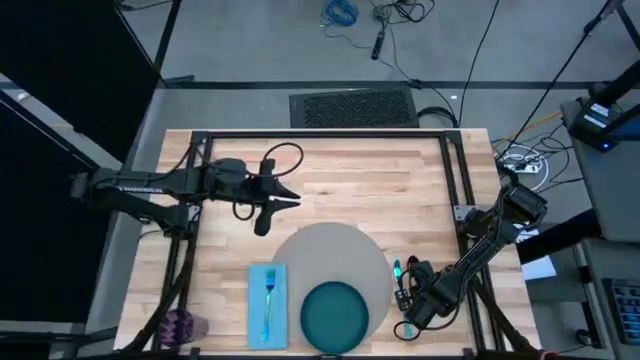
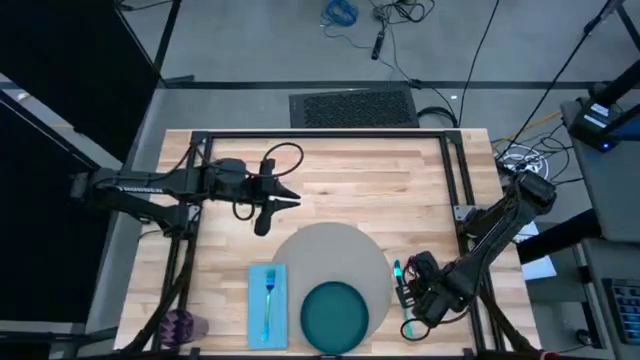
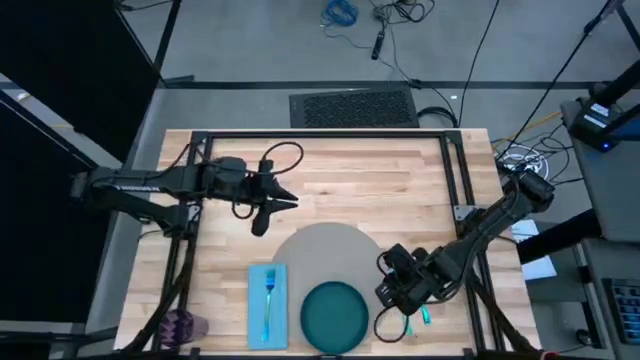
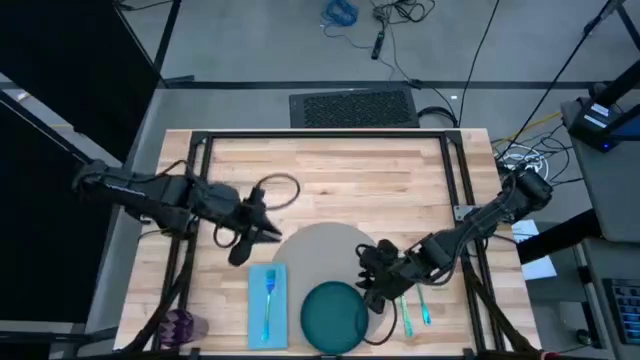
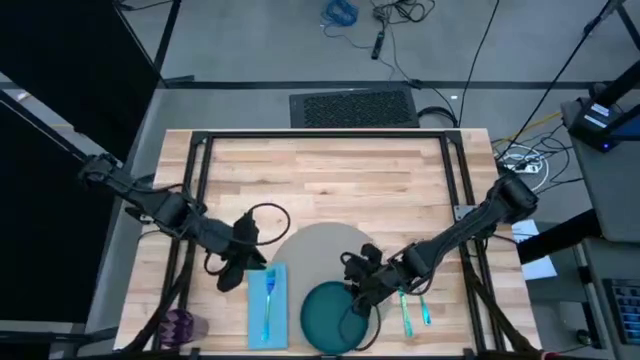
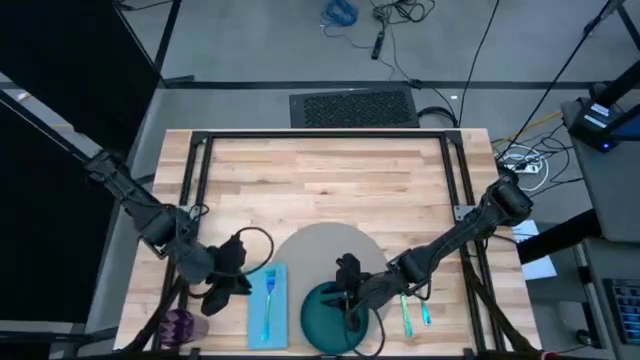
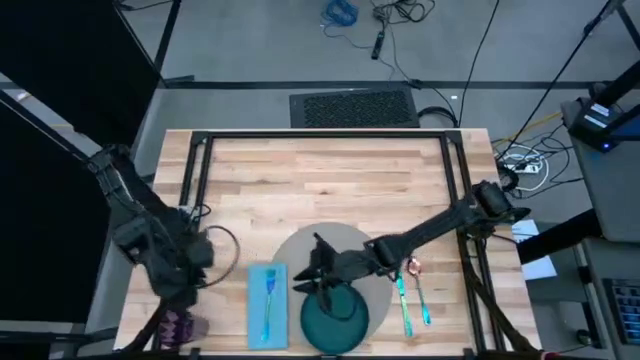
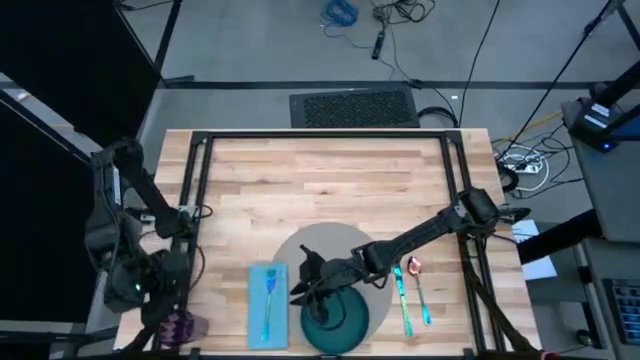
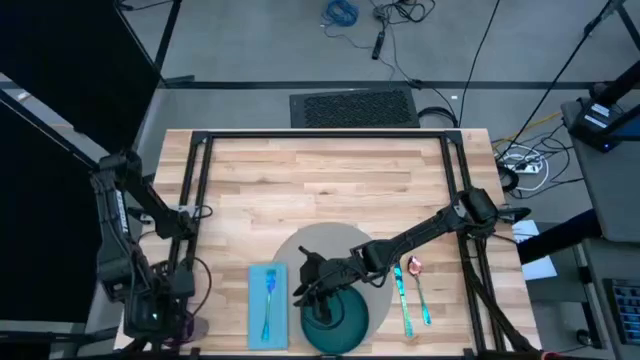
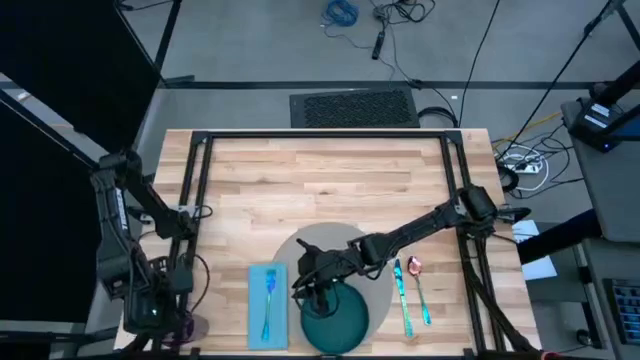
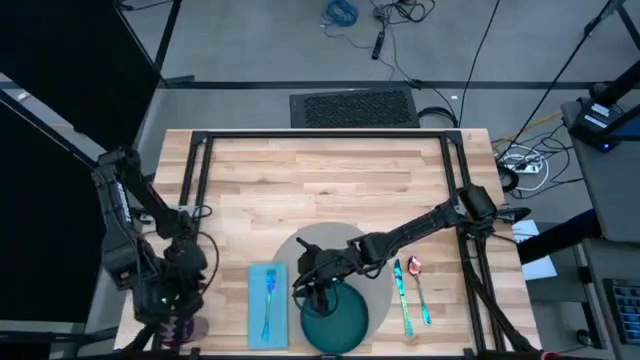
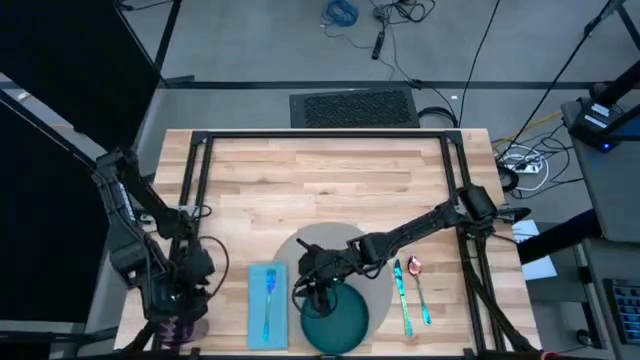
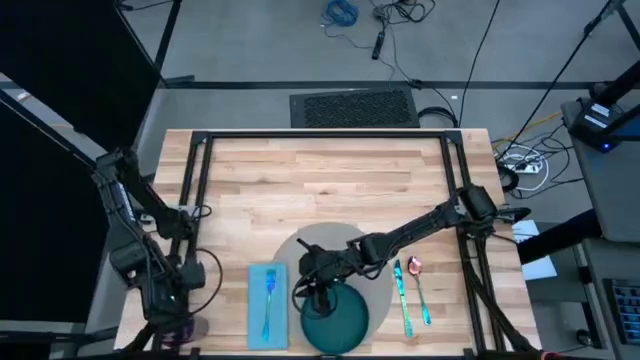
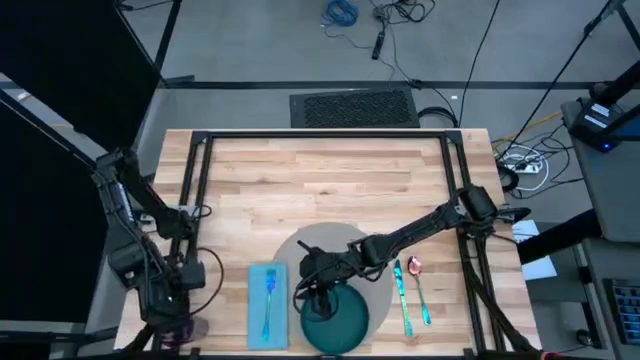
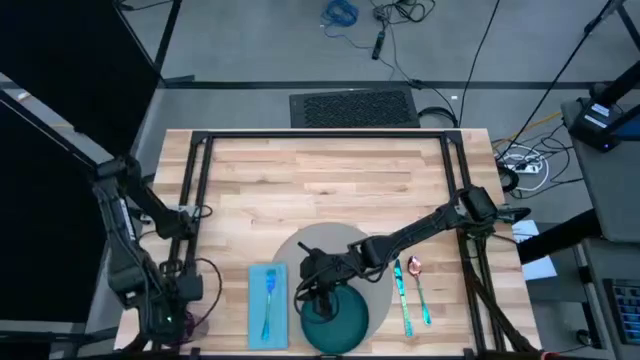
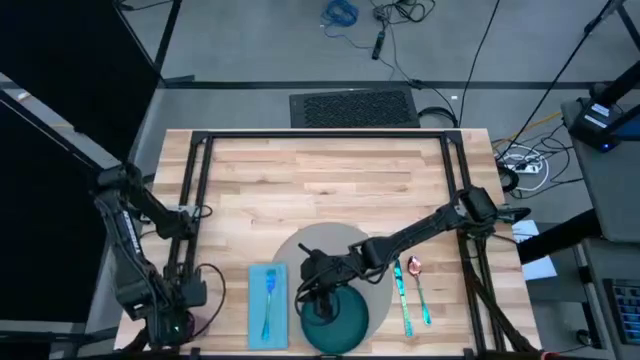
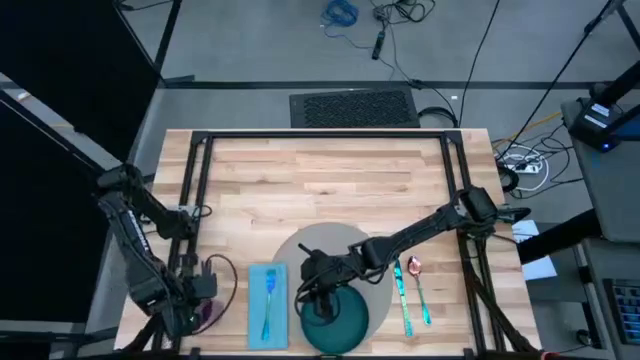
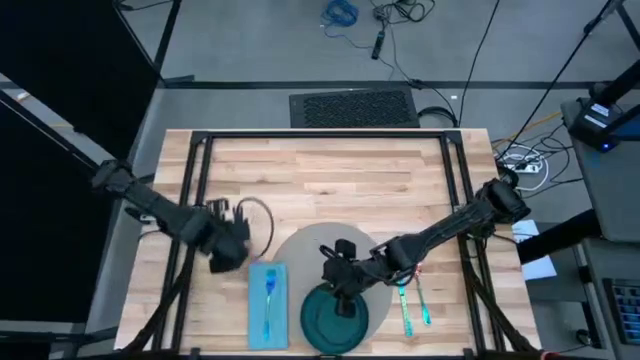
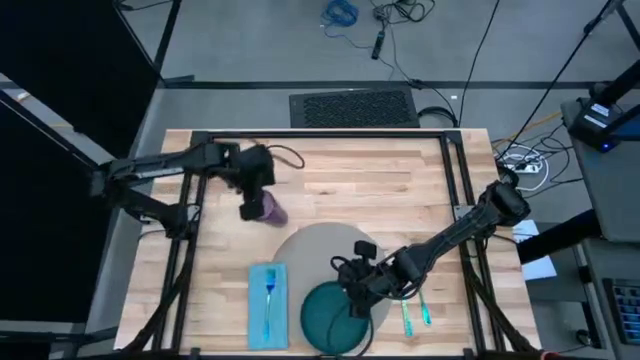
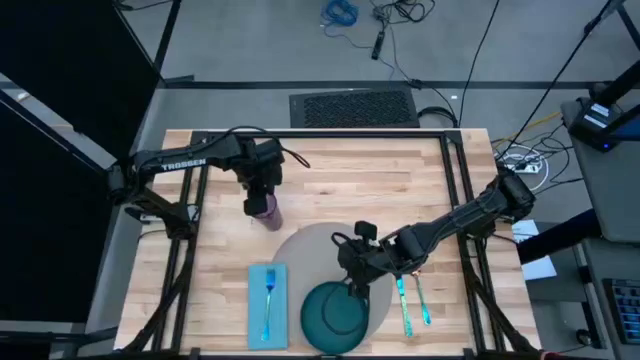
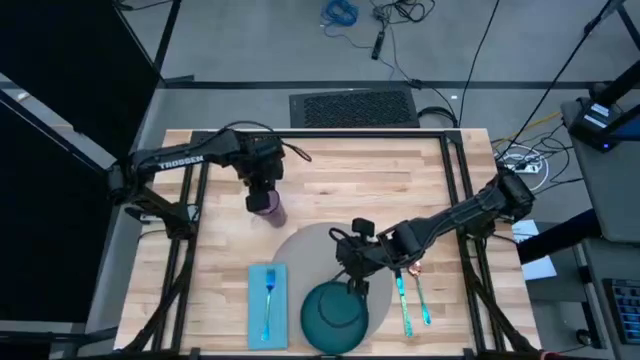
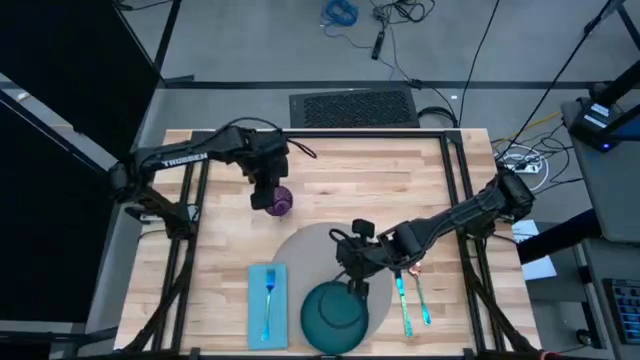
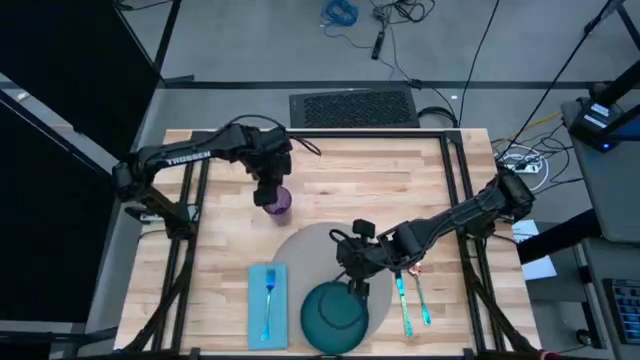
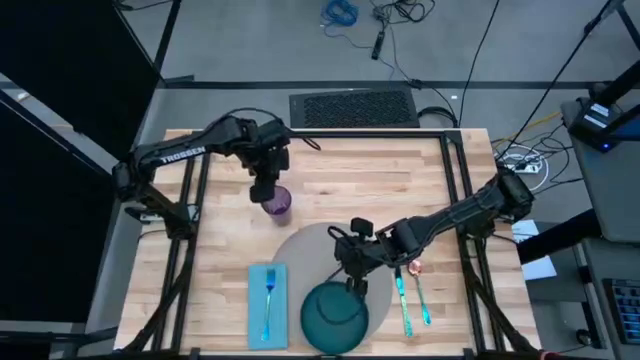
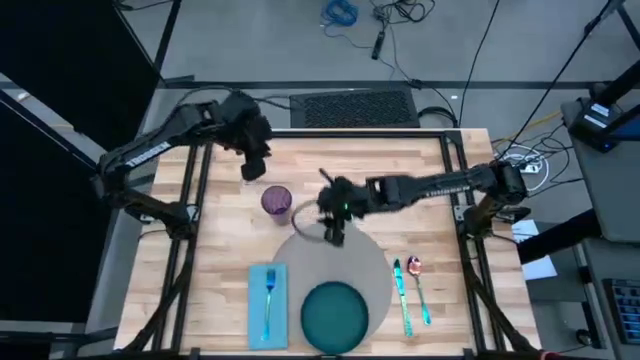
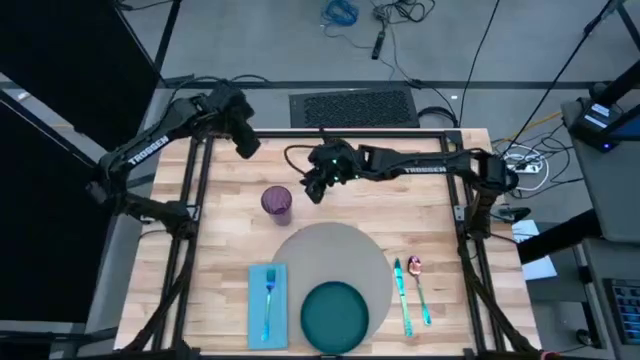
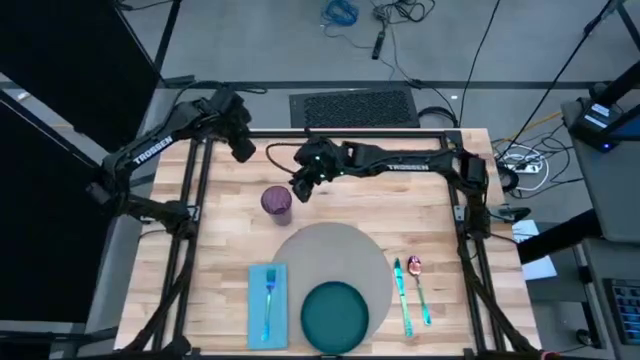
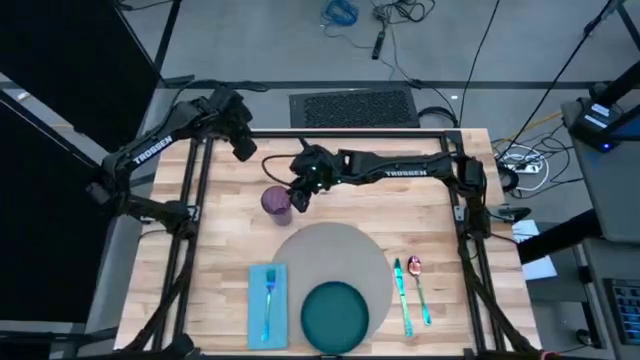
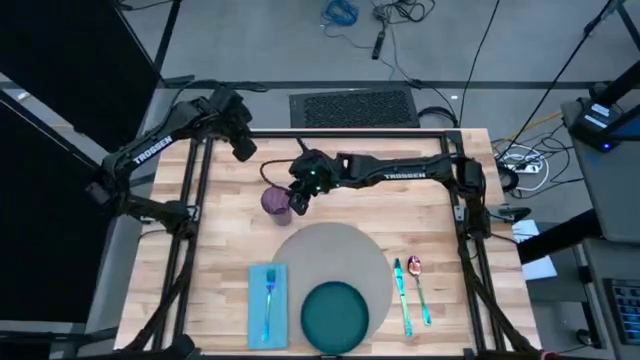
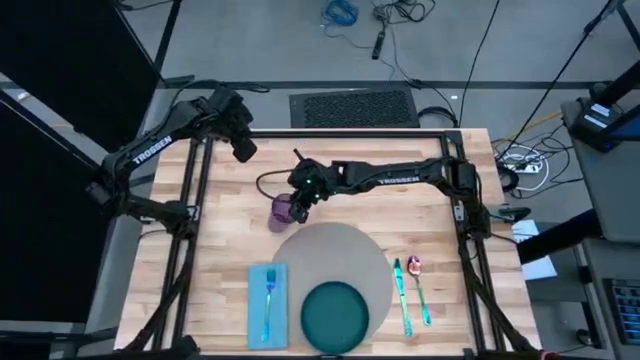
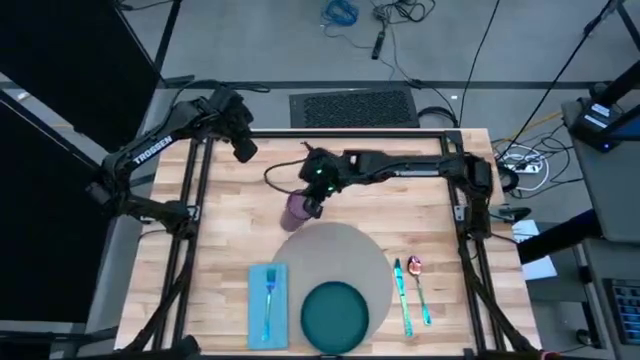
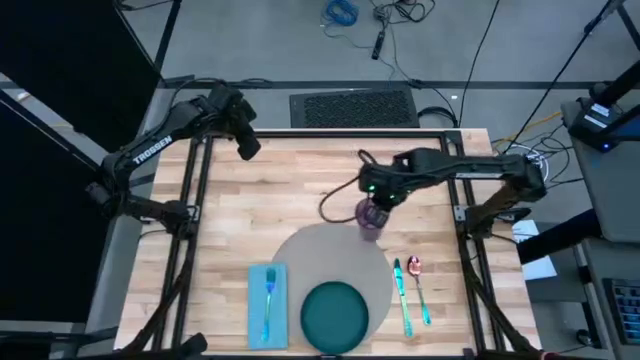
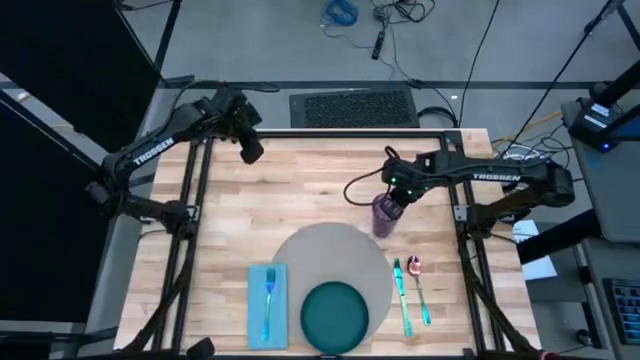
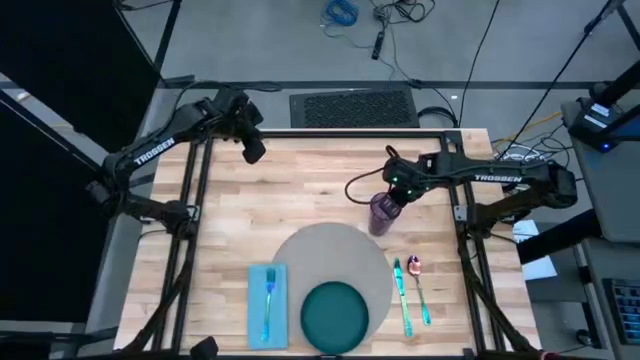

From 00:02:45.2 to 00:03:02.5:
Task: Set table place
Put the violet cup to the top right of the brown table mat

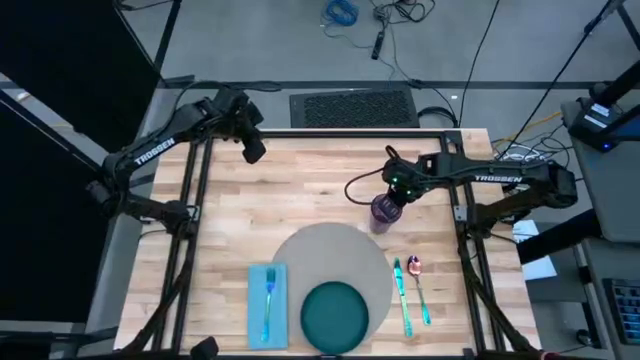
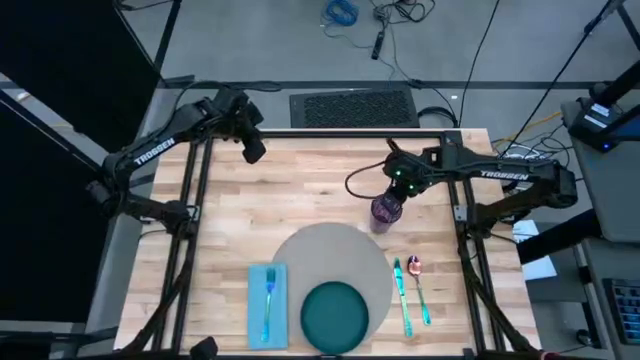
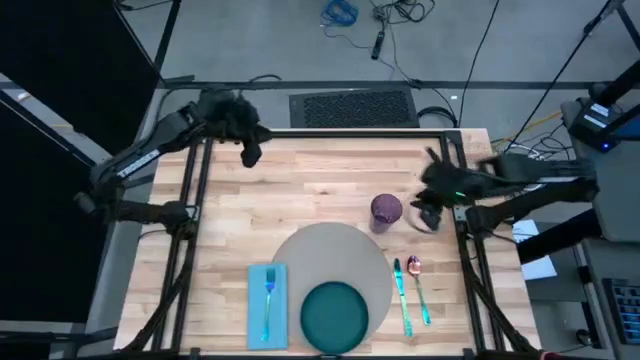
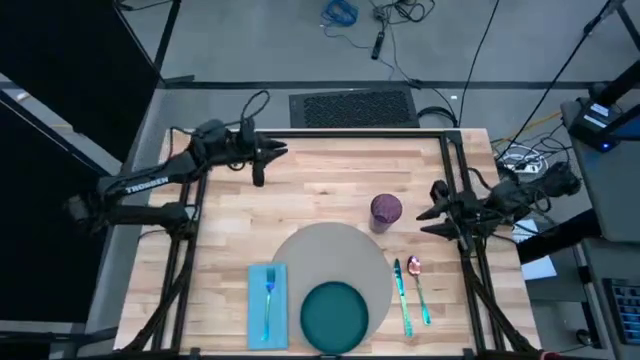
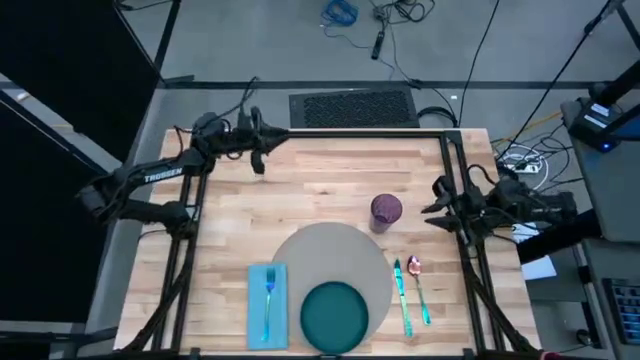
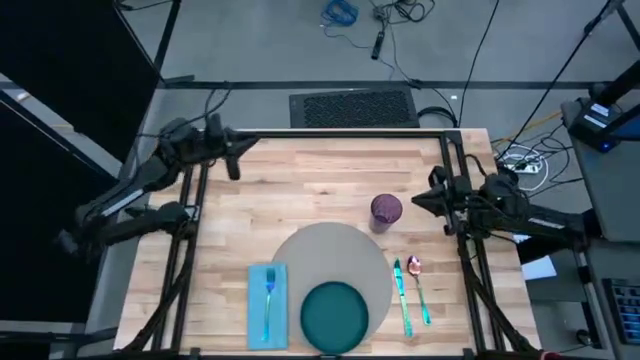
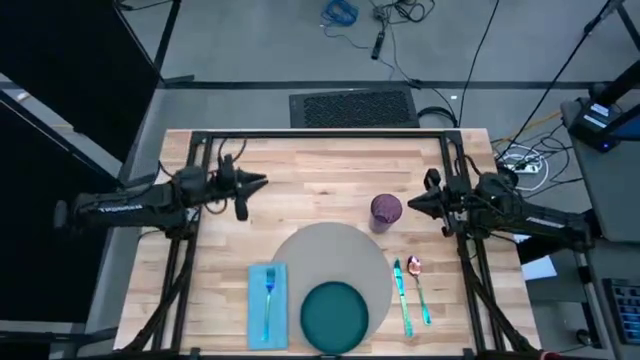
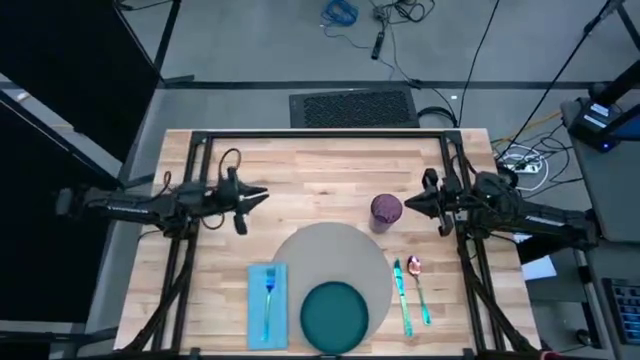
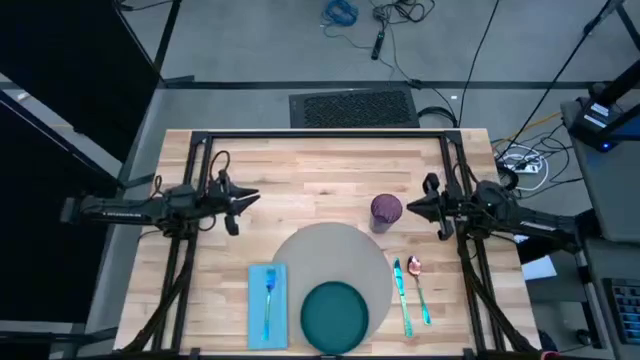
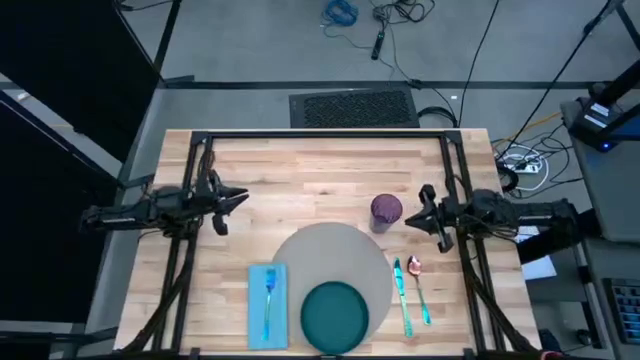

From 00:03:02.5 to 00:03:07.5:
Return to Home Position
